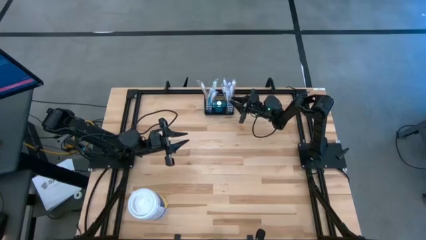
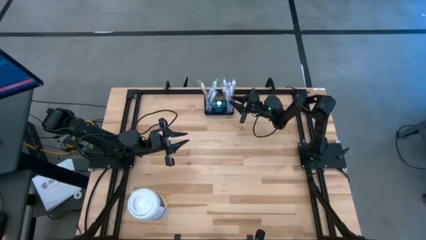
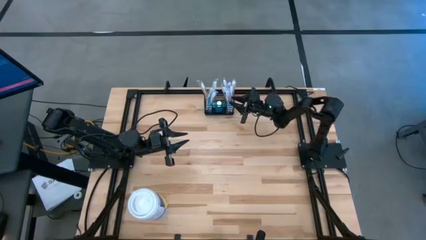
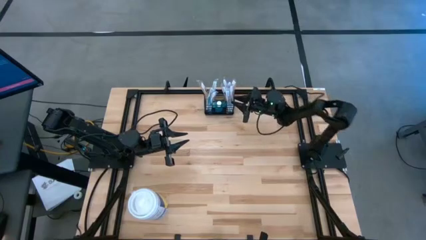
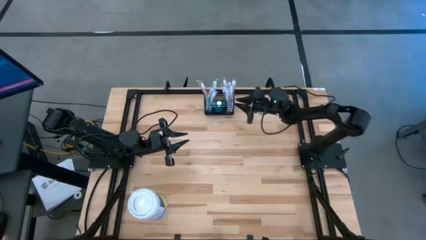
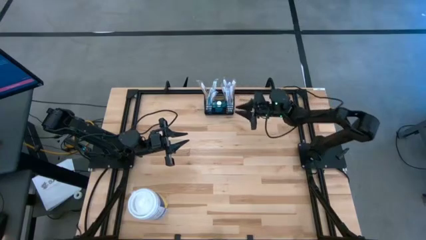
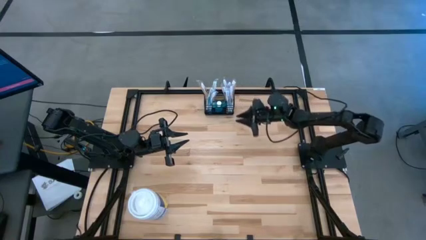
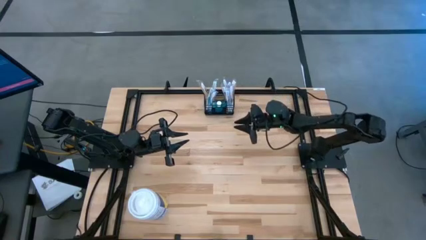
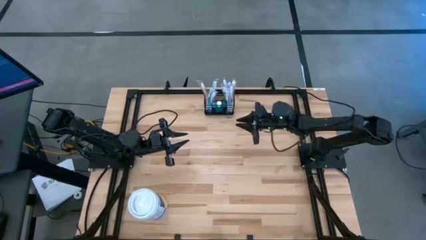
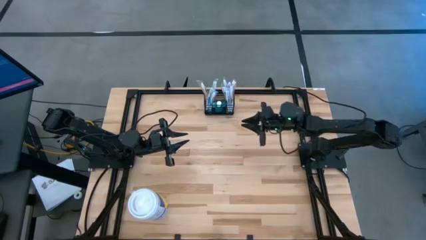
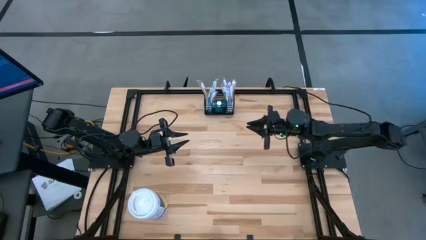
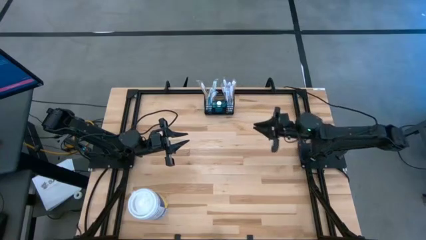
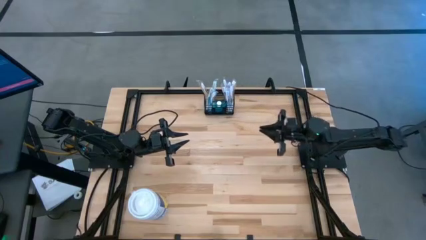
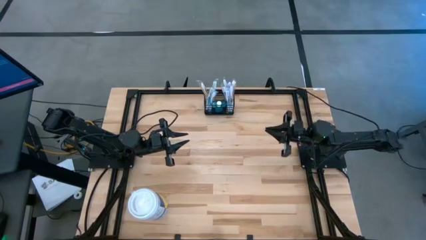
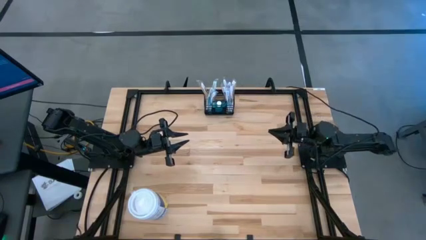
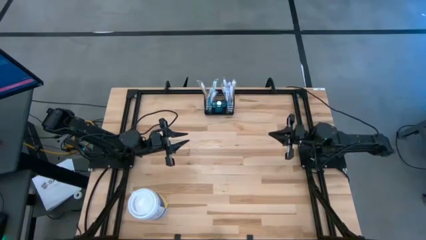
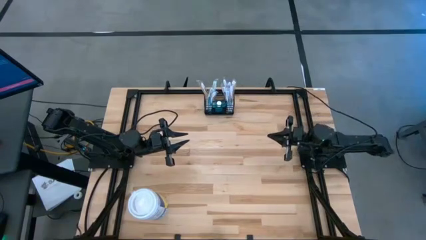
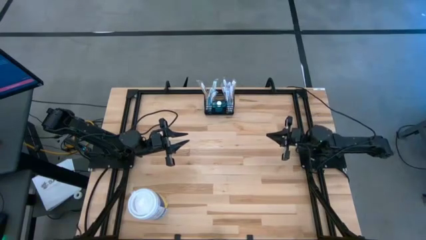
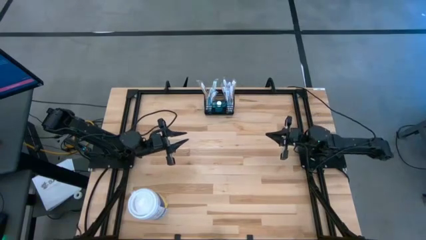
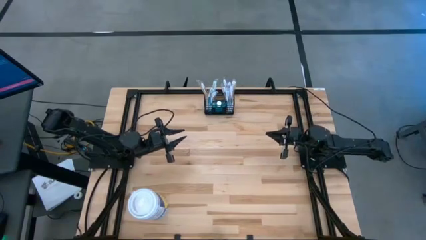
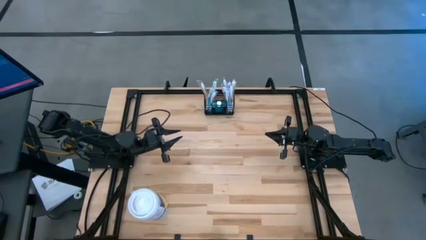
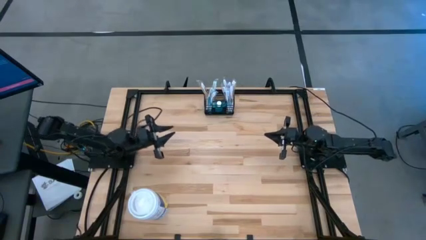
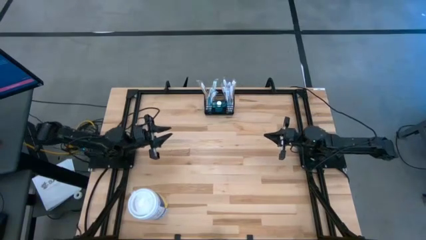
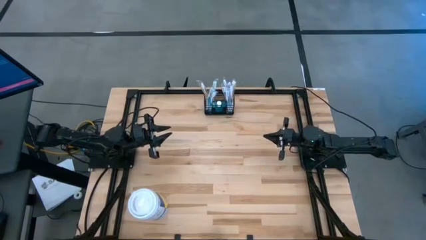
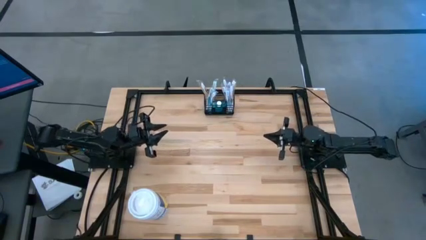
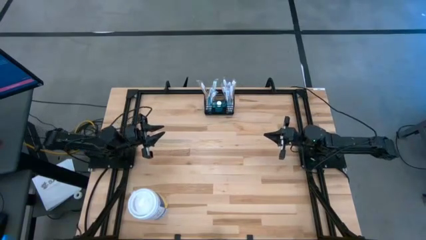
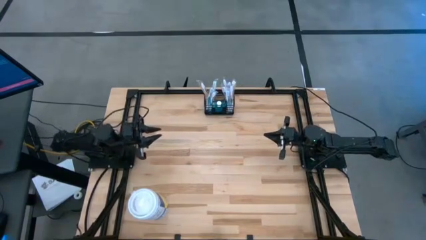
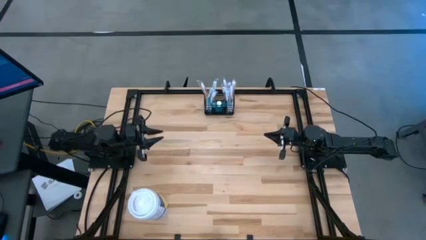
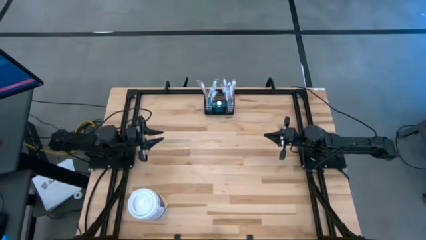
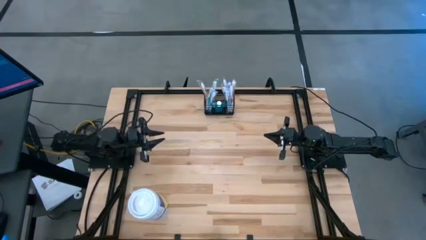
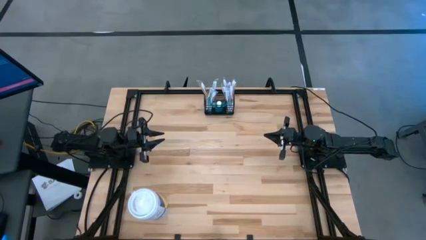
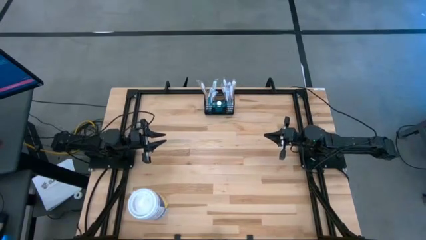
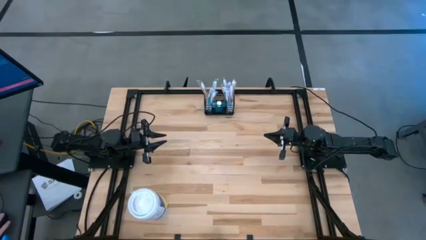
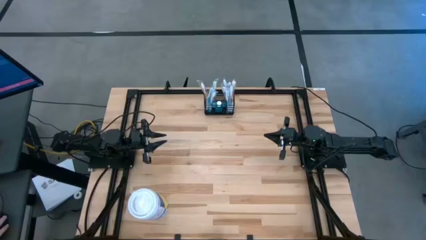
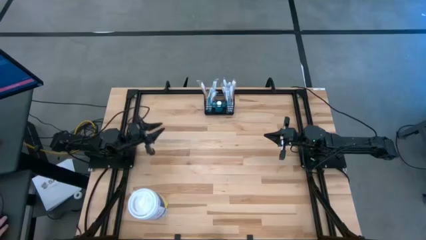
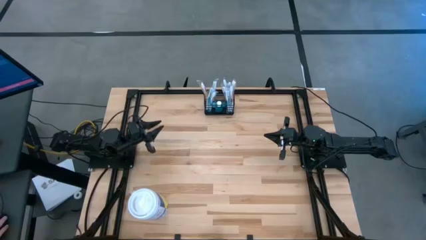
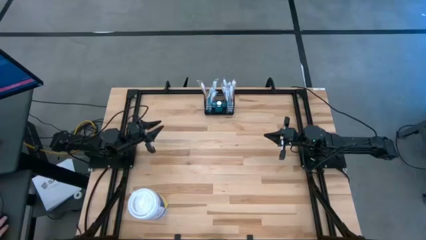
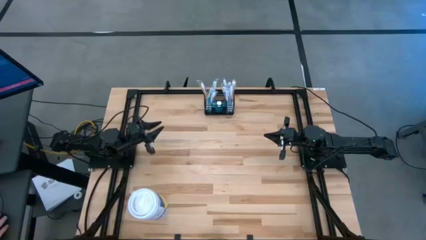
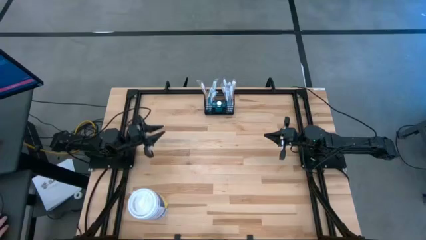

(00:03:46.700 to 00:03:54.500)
Task: Pick & Place toothbrushing station
Return to Home Position

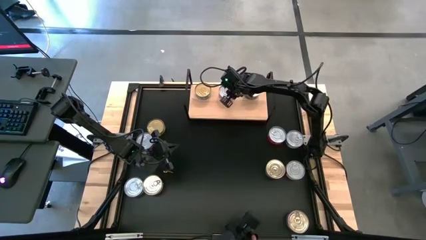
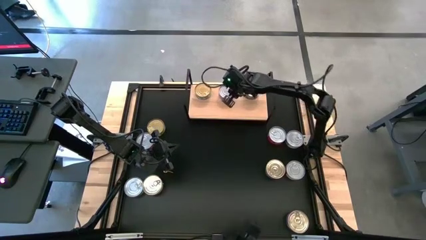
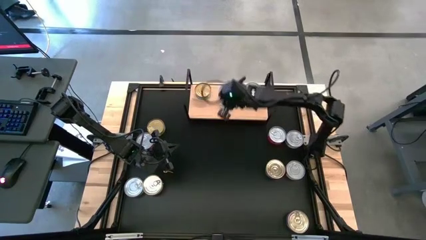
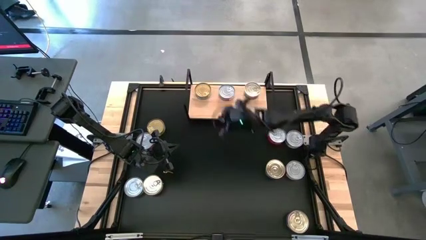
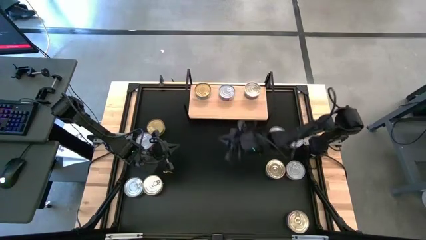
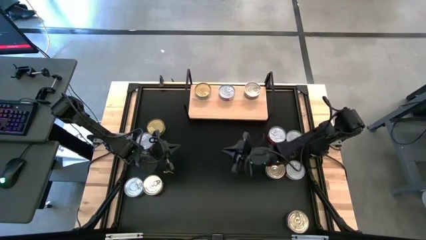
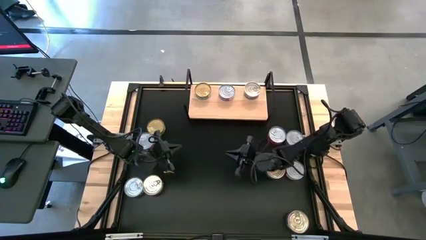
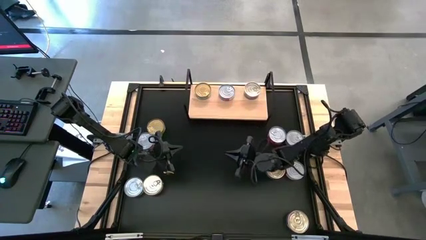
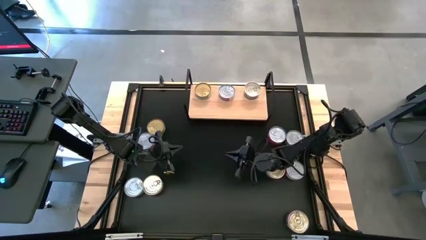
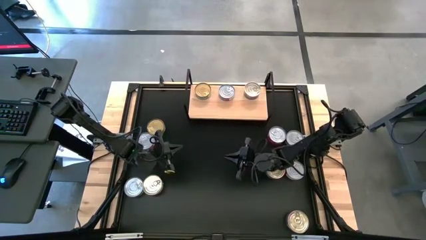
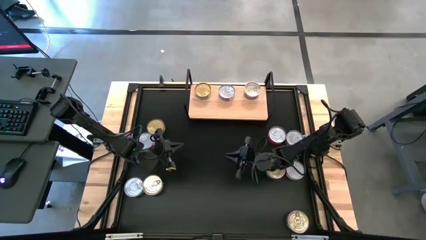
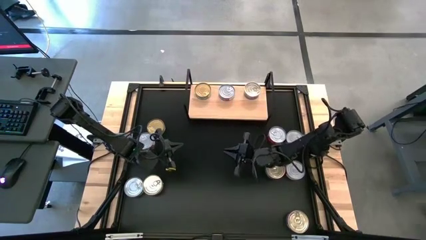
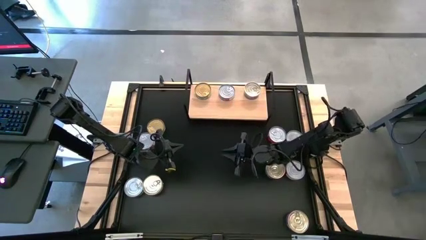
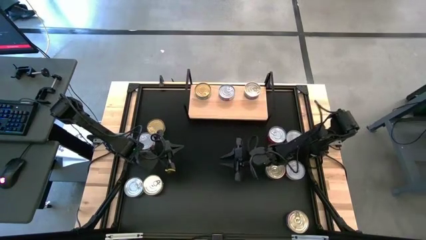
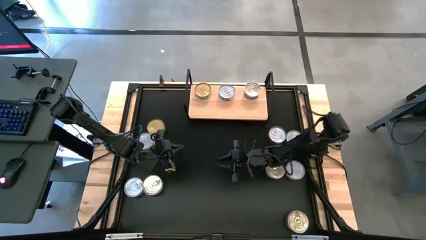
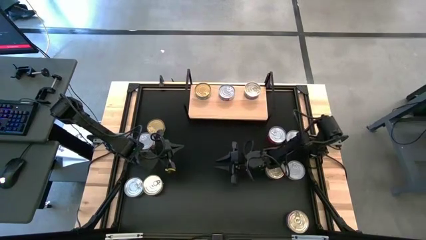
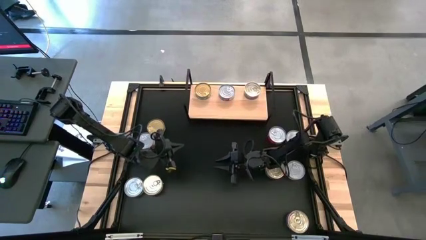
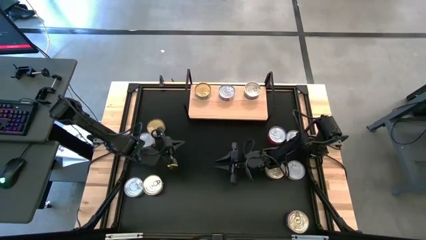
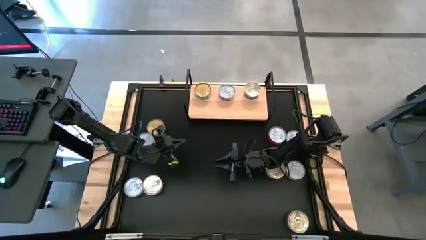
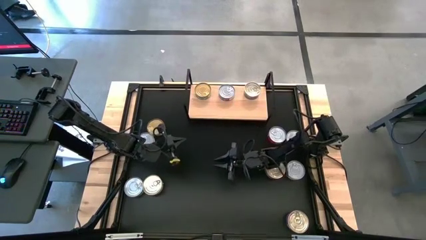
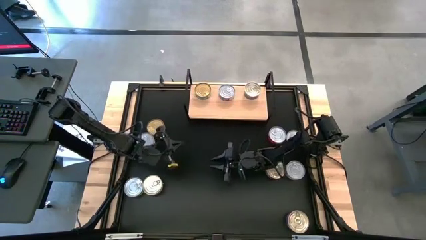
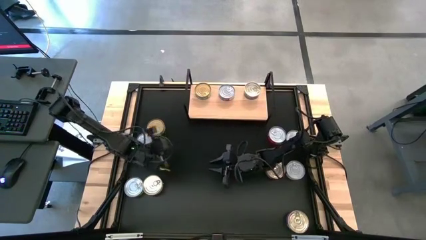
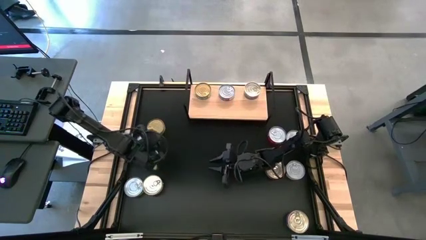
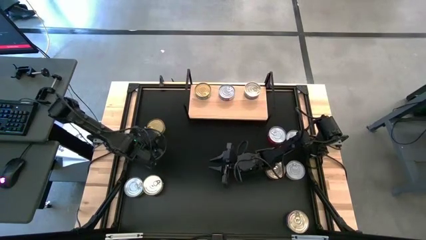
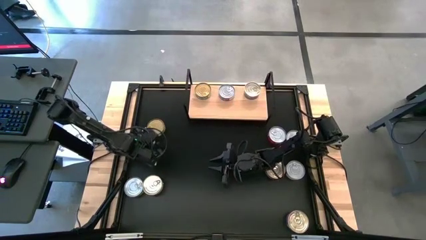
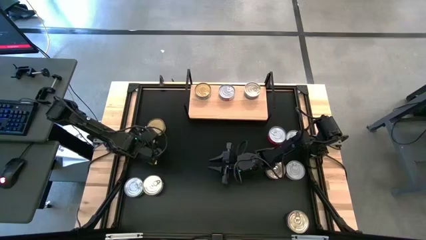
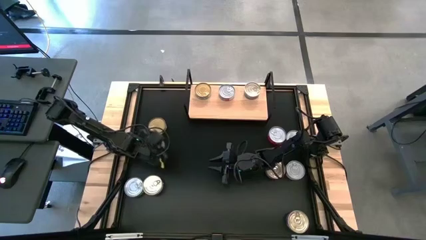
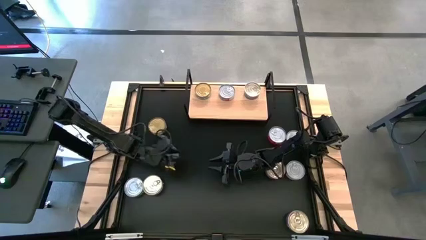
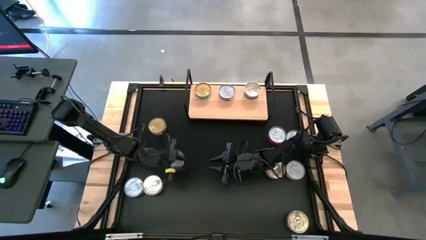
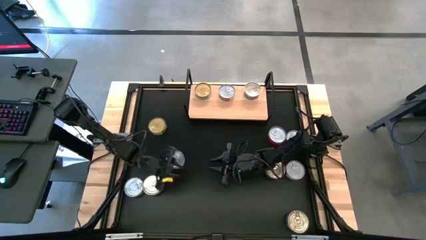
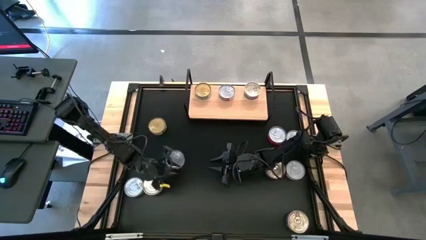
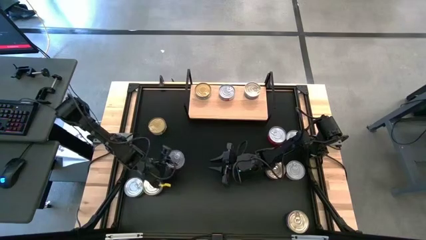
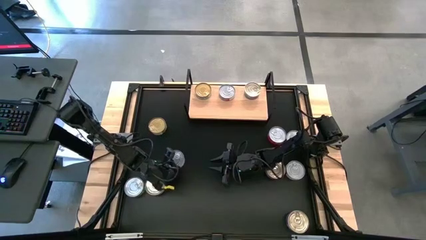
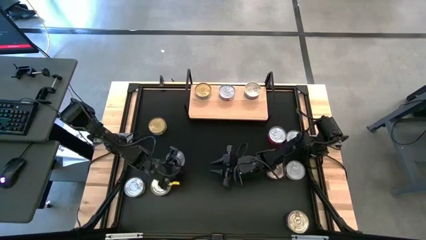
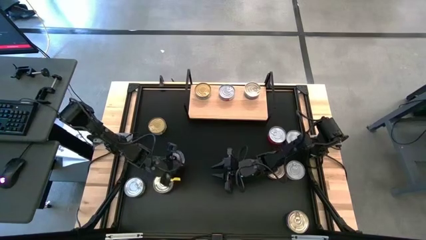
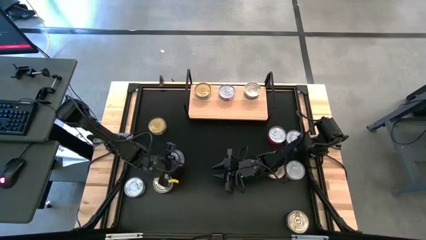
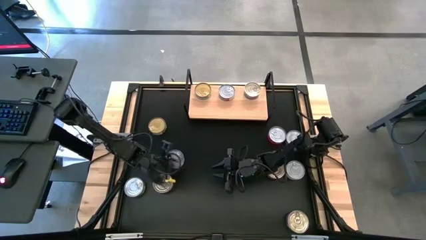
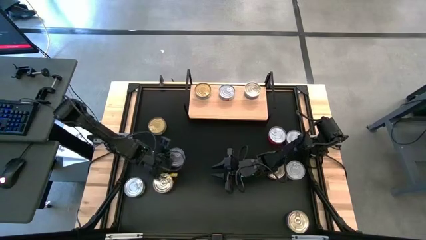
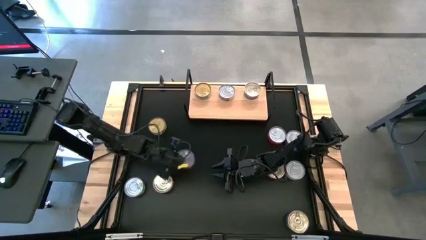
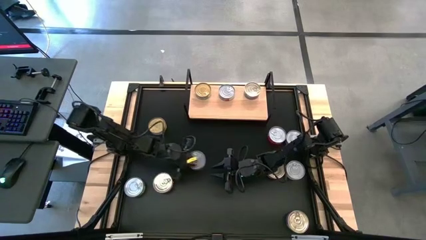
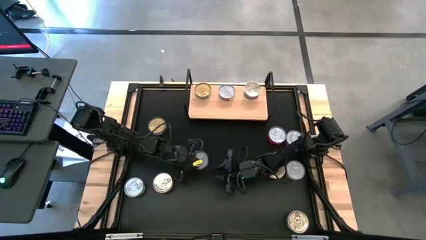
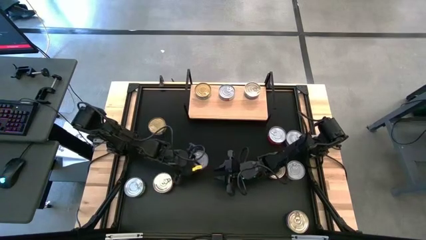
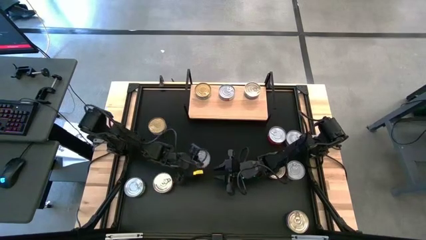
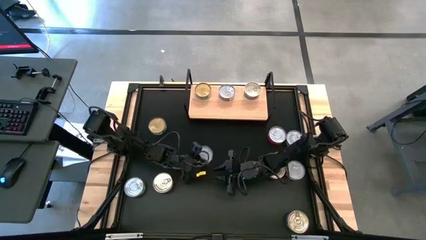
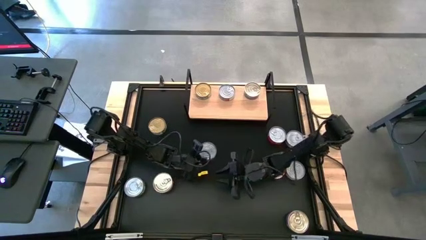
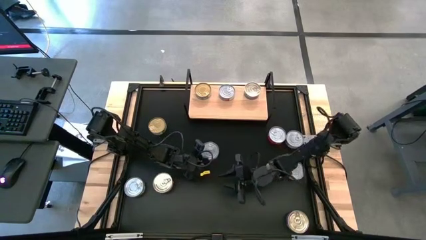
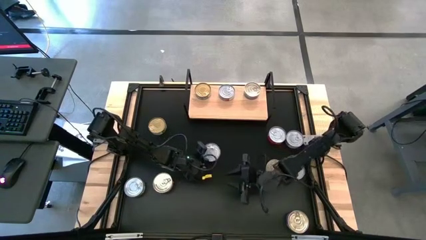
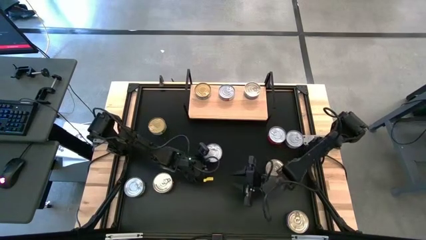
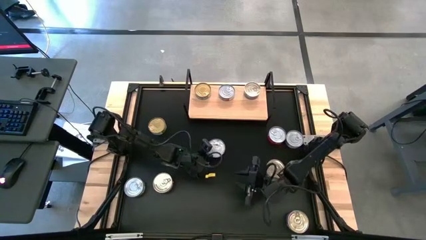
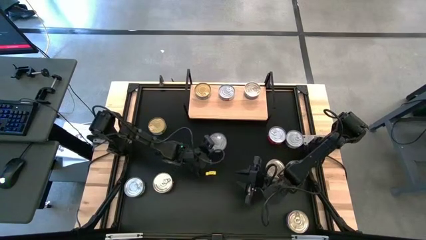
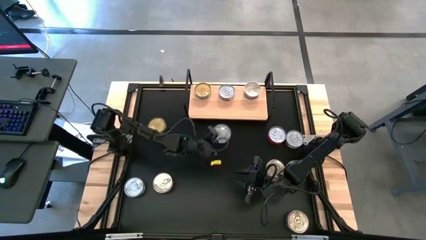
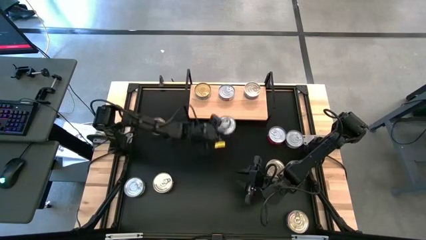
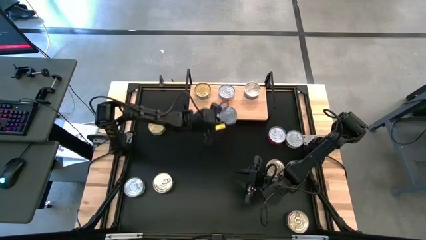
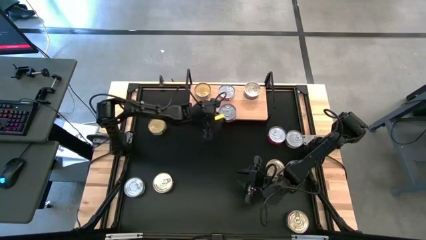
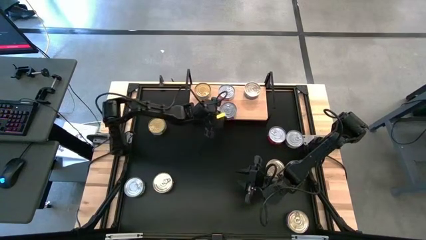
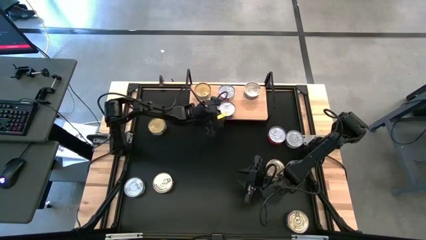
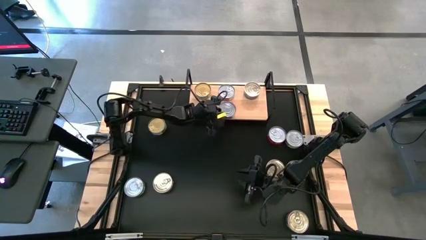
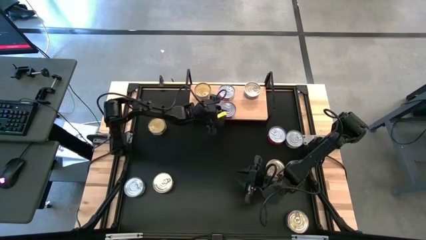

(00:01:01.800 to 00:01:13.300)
Task: Stack canned seafood by type on shelf
Align the red tuna can with the other red tuna can on the shelf
